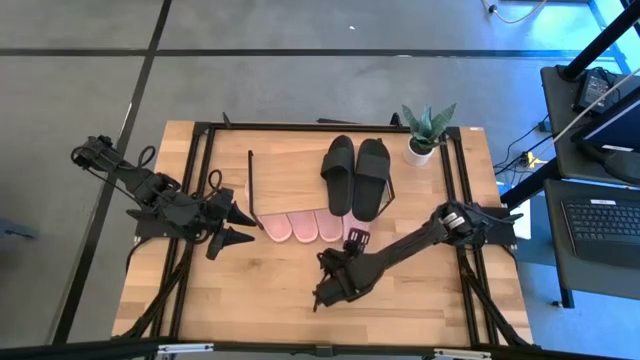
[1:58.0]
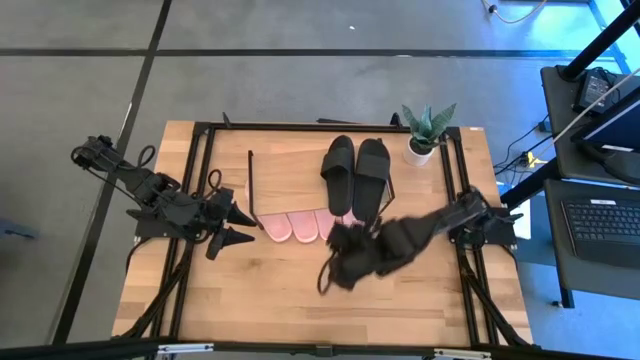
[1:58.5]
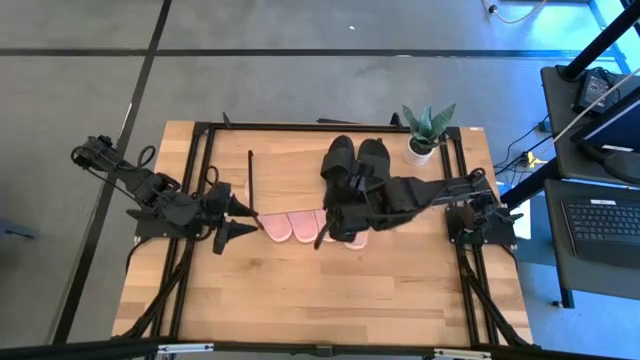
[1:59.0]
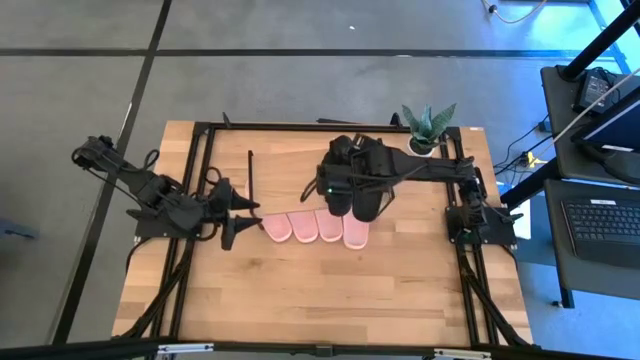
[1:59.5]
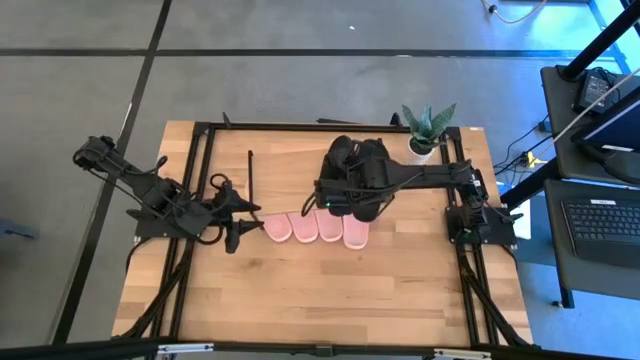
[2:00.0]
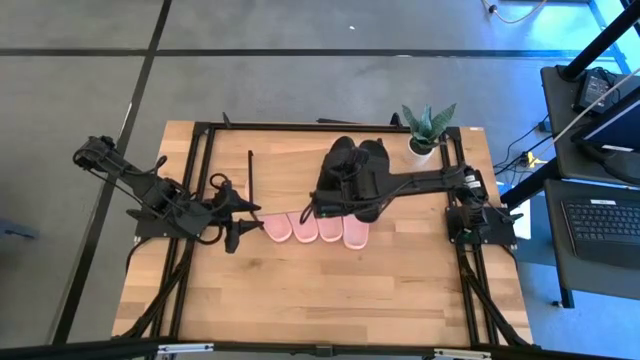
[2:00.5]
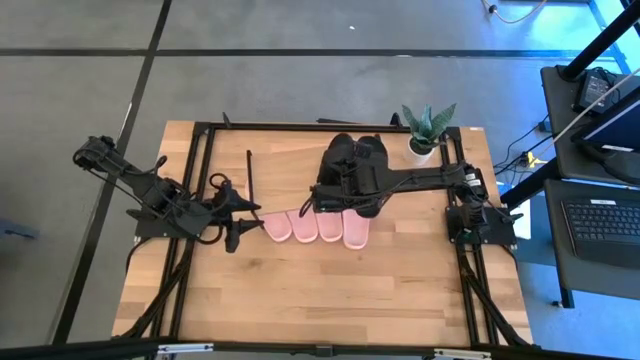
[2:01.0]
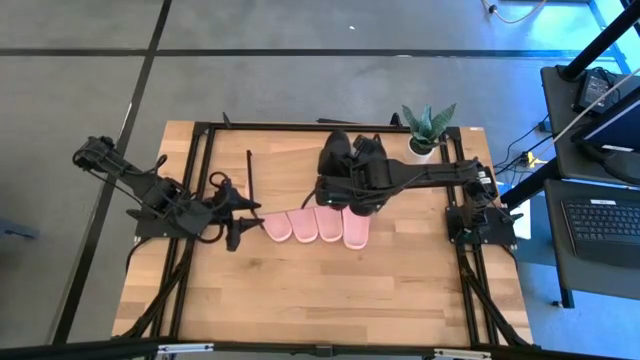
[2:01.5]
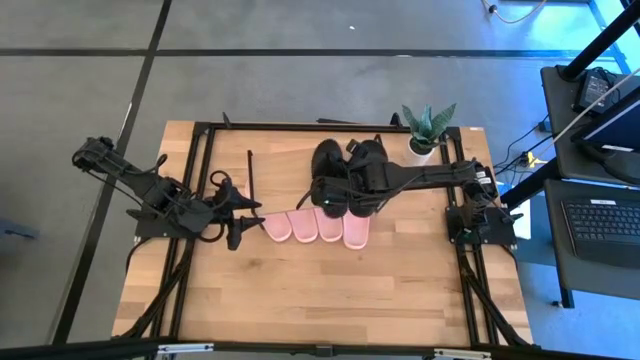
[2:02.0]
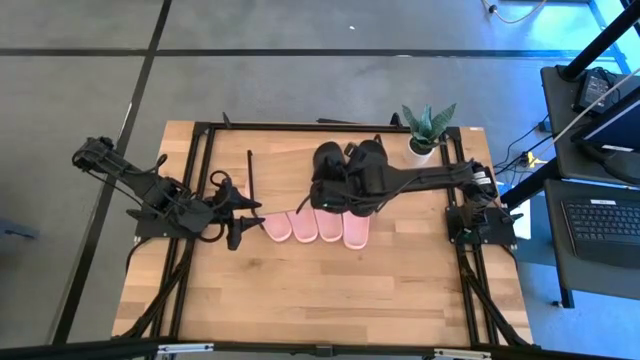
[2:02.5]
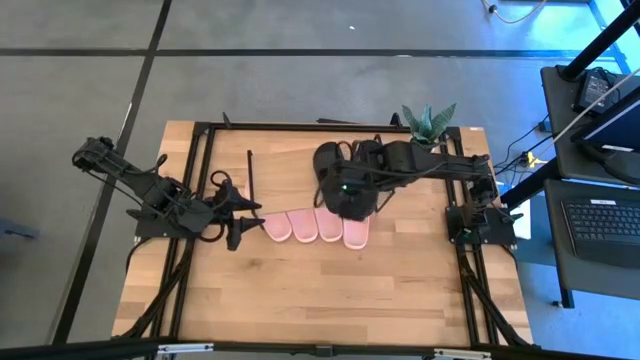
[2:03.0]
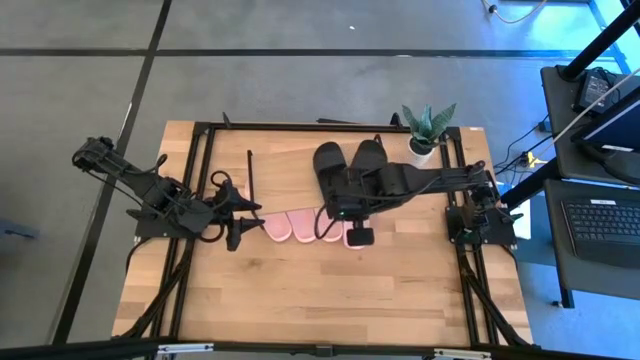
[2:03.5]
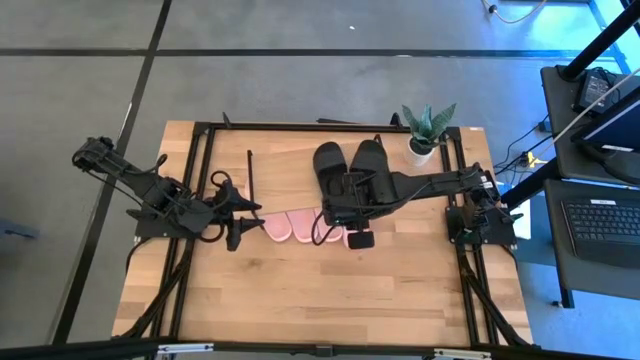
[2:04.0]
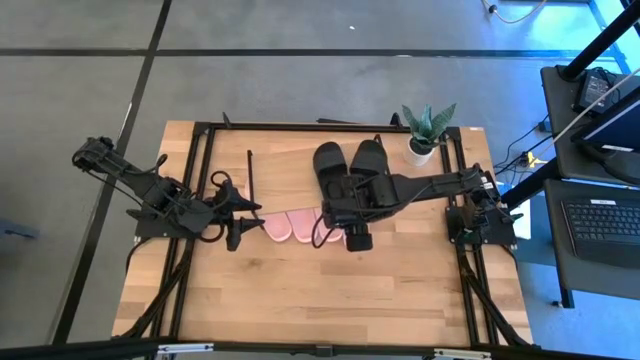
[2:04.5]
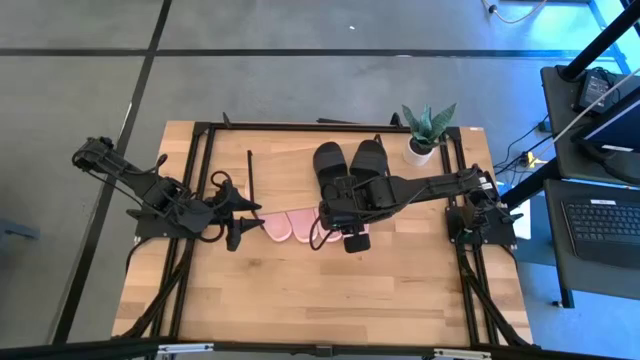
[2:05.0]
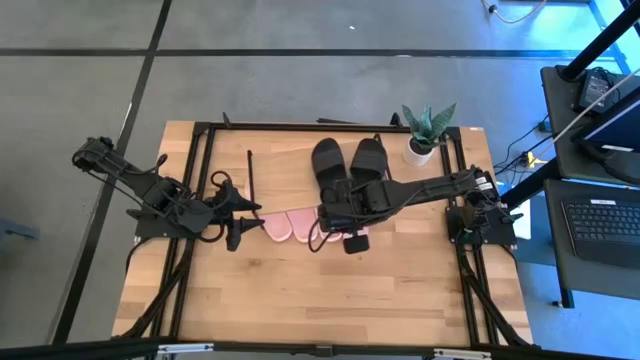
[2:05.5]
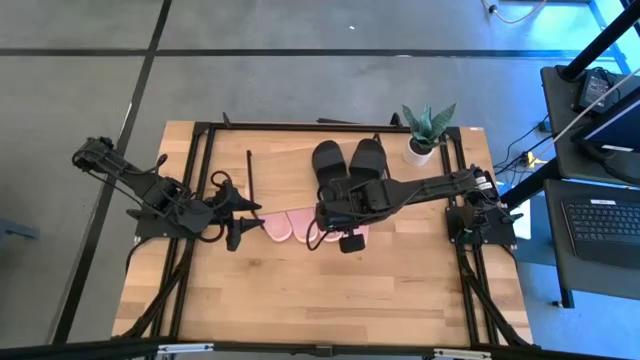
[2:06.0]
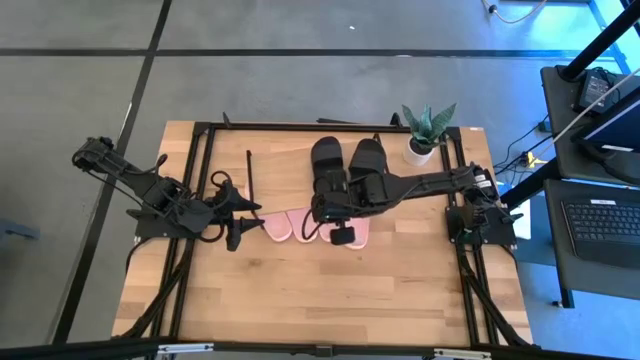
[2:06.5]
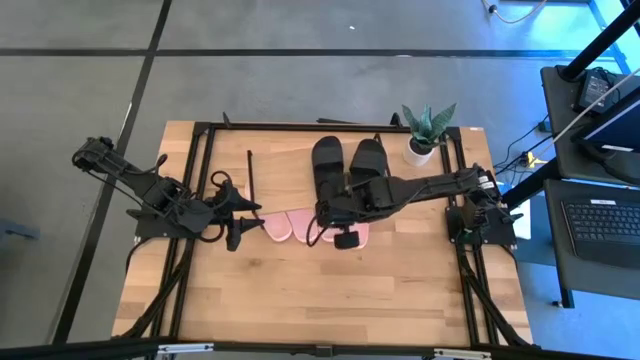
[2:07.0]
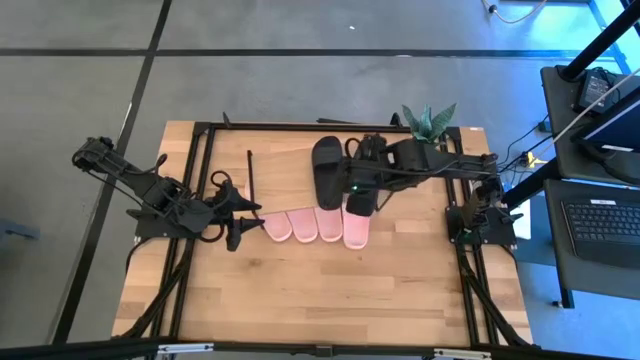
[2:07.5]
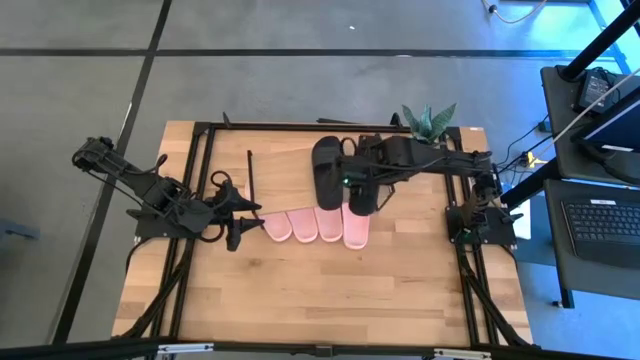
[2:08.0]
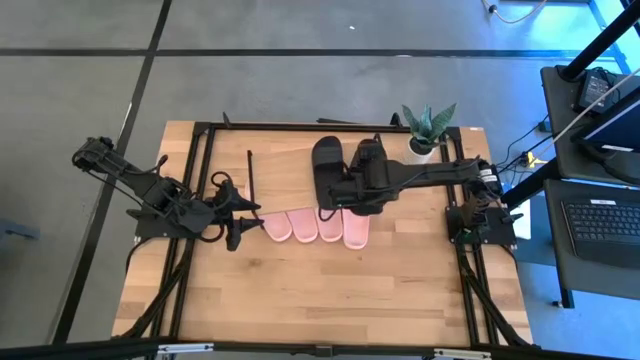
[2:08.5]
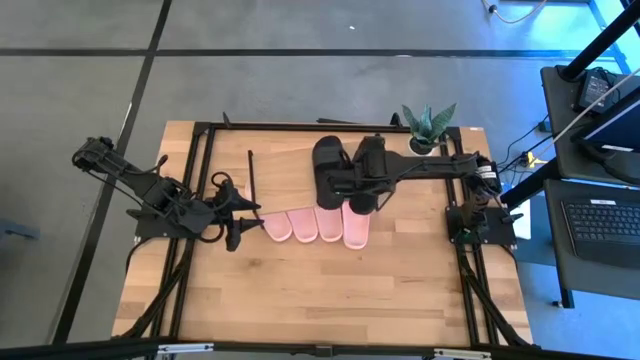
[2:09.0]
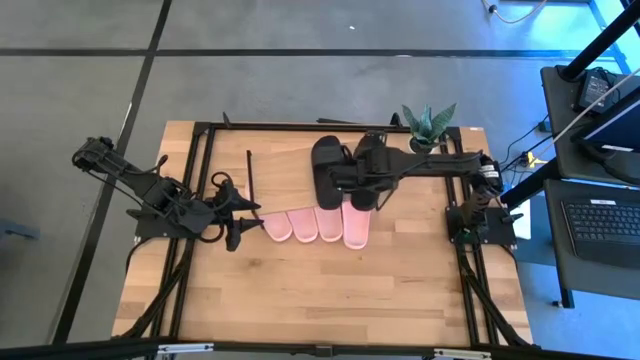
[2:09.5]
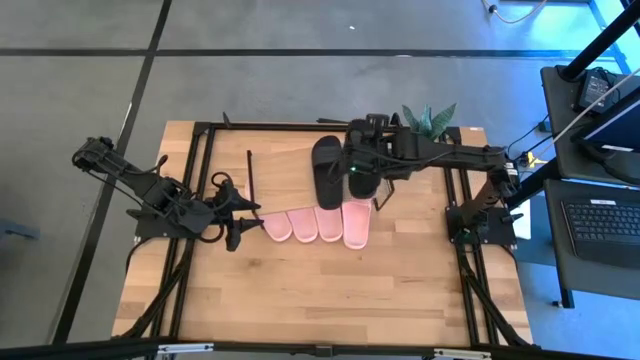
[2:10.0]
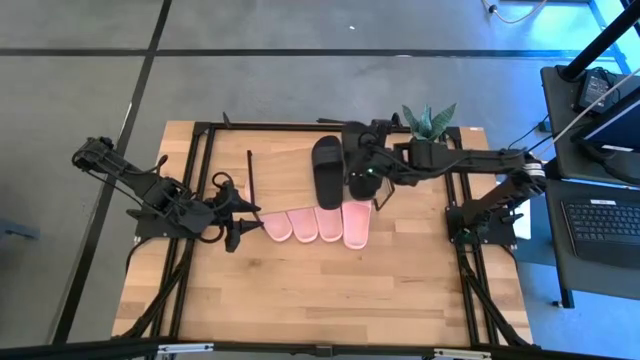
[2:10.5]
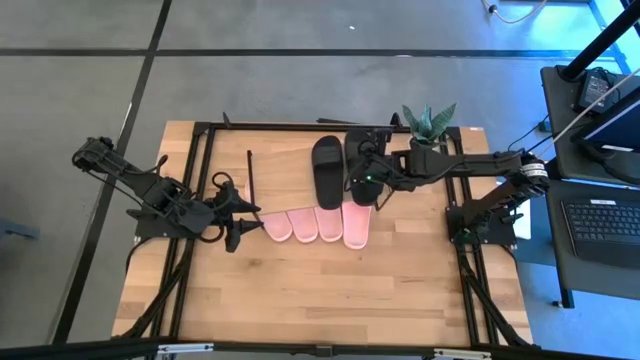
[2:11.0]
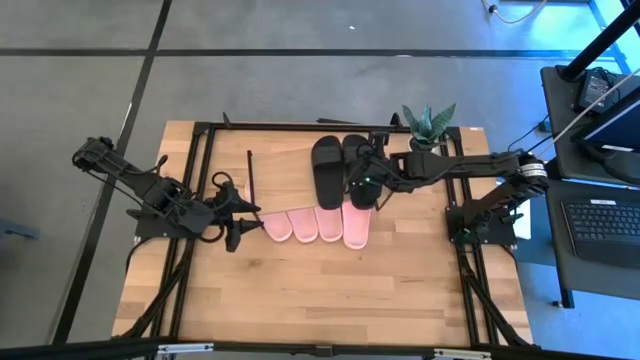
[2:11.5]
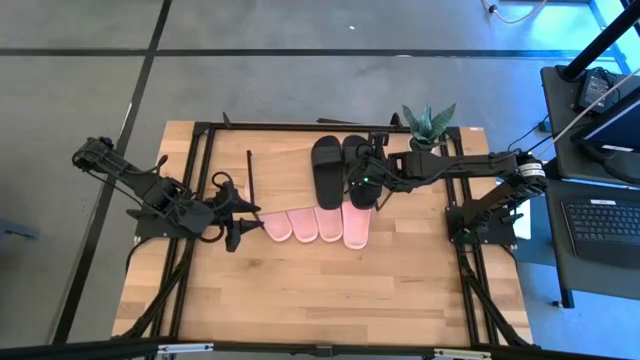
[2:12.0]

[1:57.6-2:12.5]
Task: Pick and place slides into the shelf
Adjust the black slides on the shelf

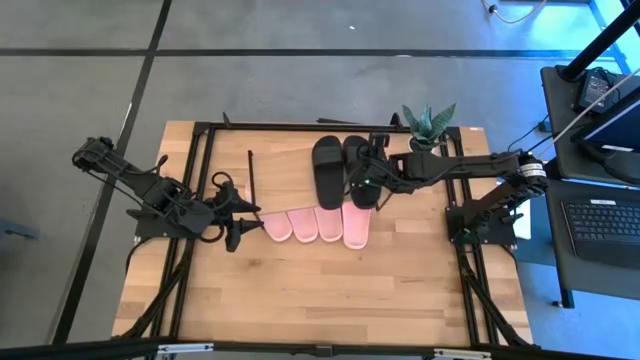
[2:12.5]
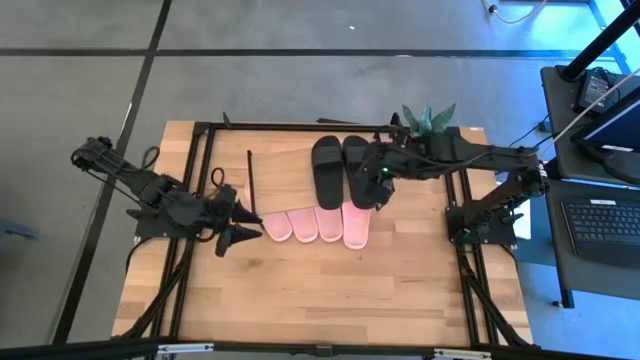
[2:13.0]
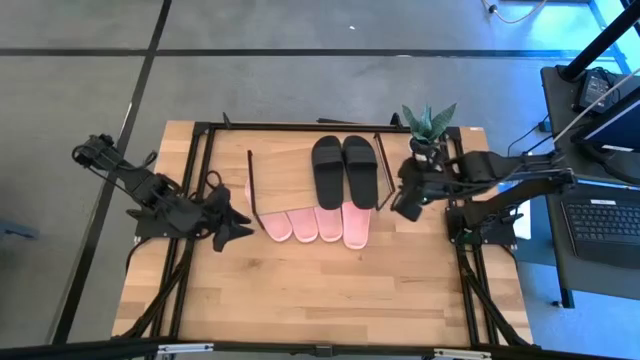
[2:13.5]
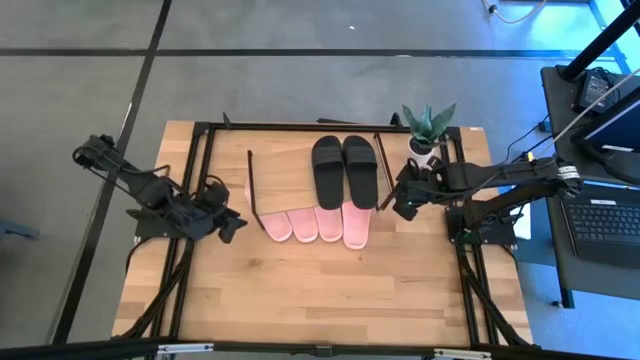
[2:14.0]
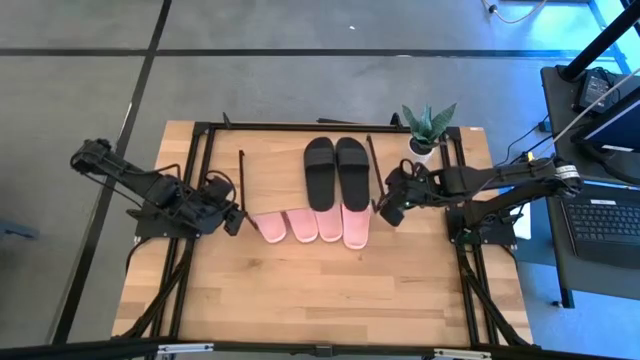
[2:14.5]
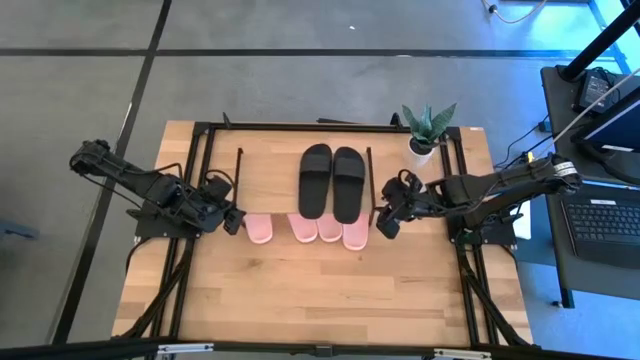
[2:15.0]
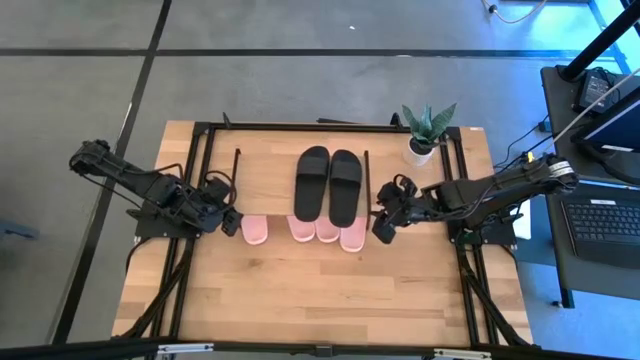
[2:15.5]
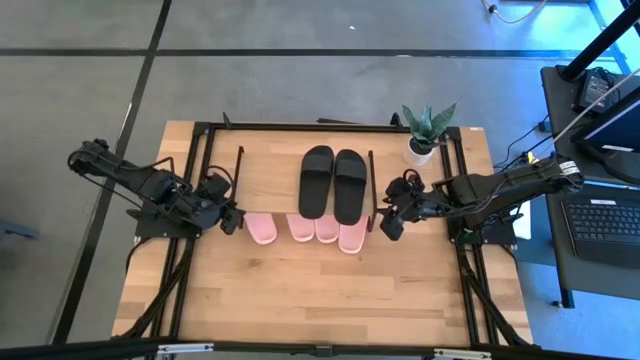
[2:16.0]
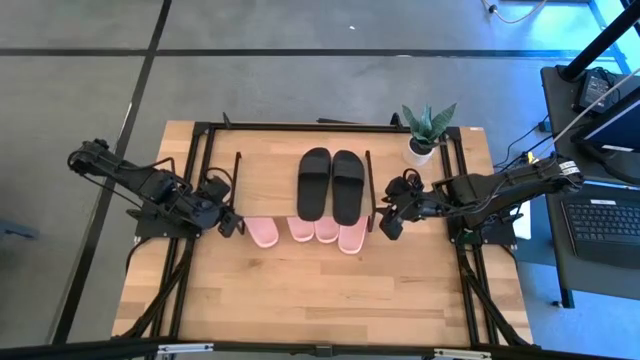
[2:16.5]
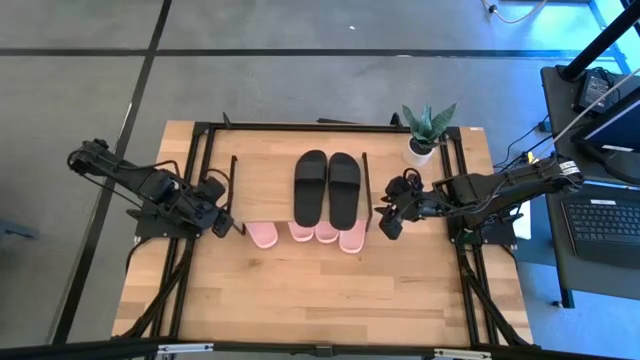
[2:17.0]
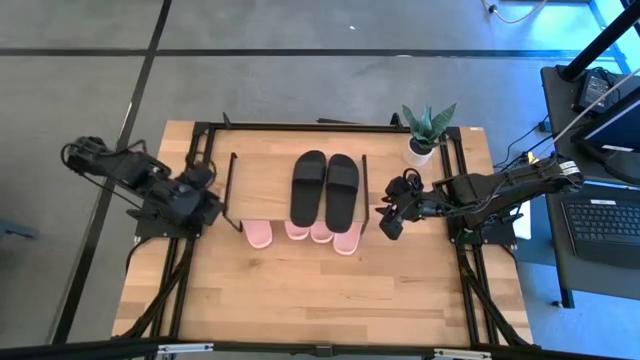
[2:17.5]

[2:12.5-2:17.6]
Adjust the shelf on the table

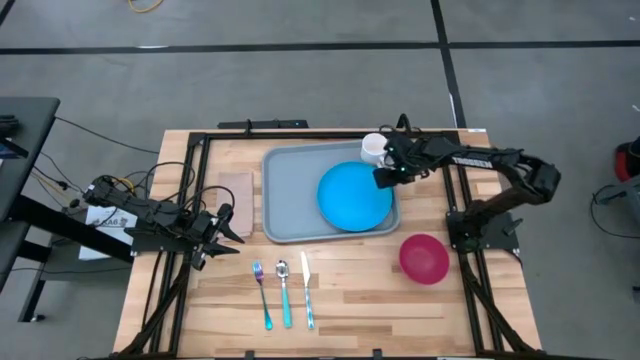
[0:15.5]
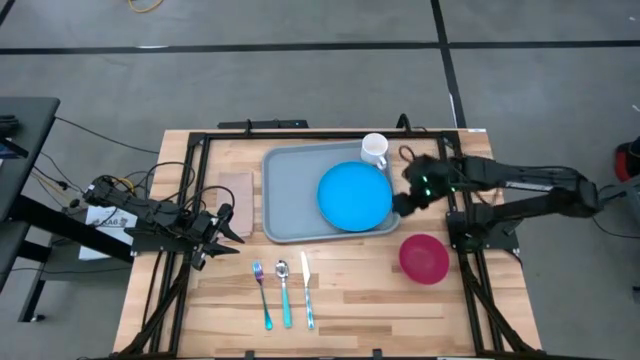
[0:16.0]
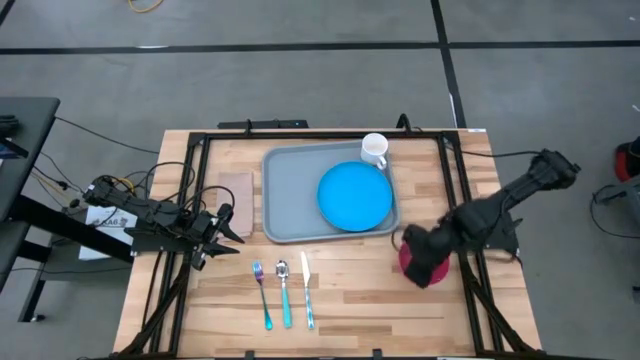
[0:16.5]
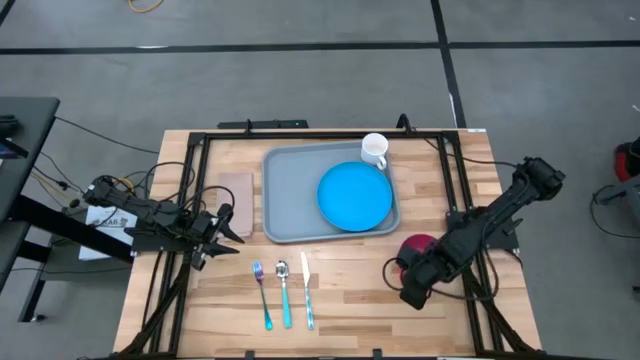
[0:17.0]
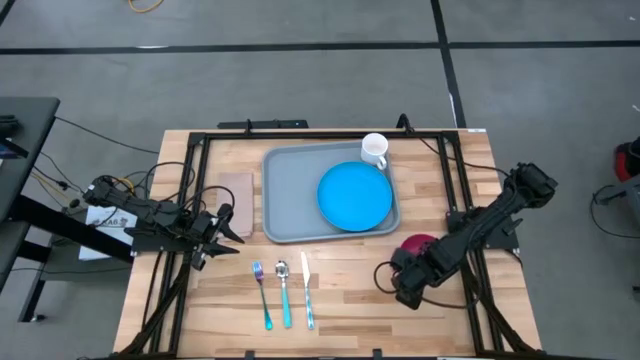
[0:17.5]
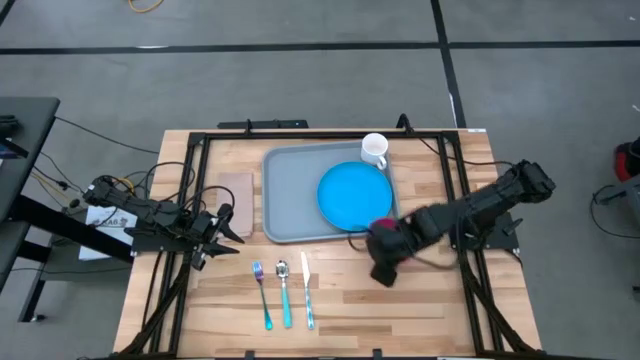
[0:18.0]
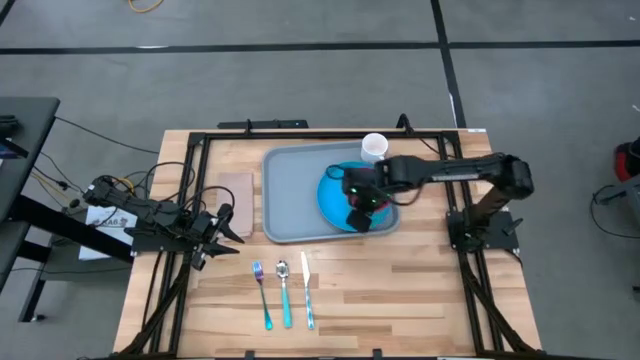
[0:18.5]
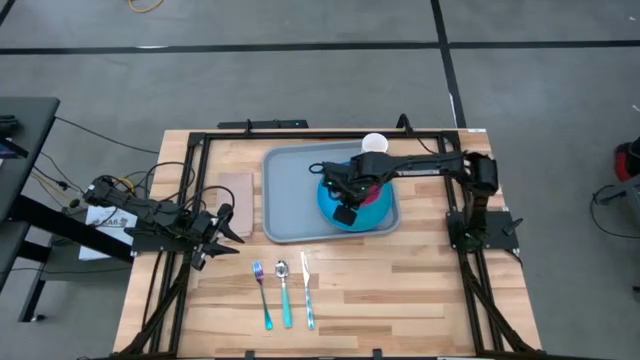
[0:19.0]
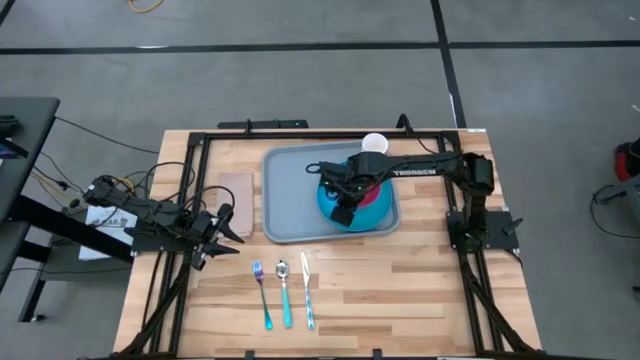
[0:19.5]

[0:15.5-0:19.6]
Task: Set up tray
Put the red bowl on the blue plate on the blue tray
